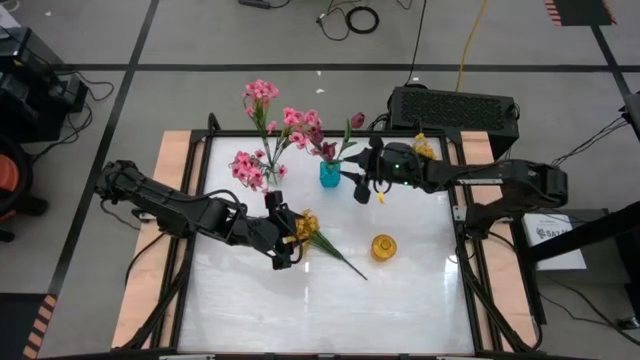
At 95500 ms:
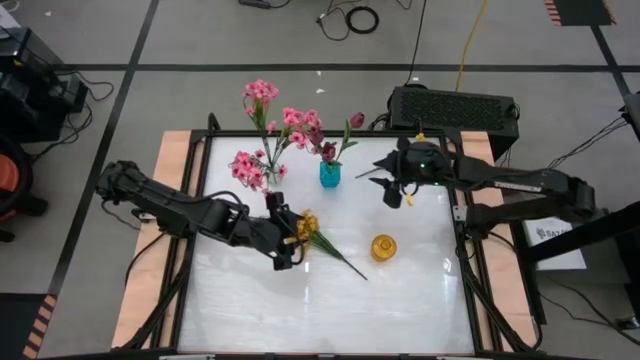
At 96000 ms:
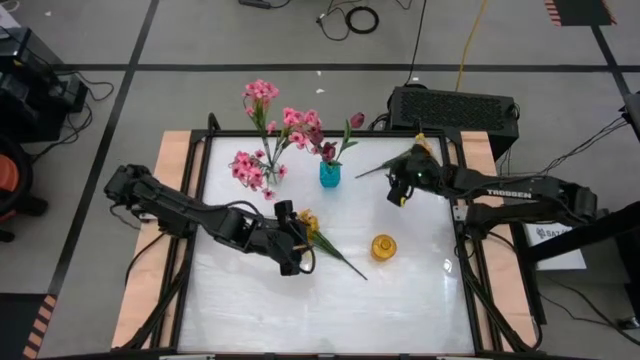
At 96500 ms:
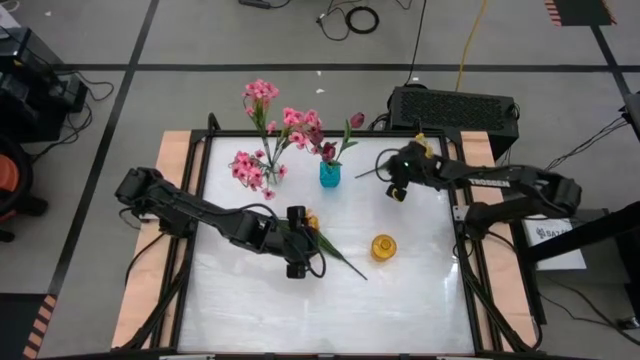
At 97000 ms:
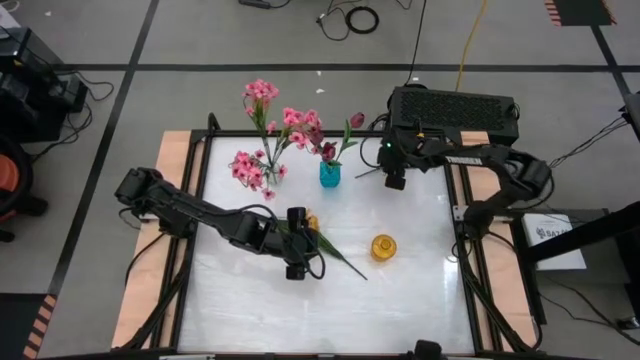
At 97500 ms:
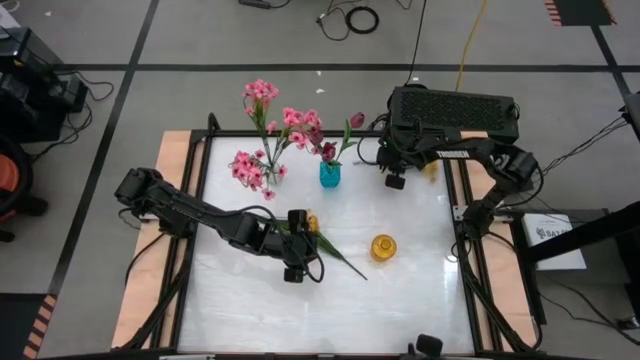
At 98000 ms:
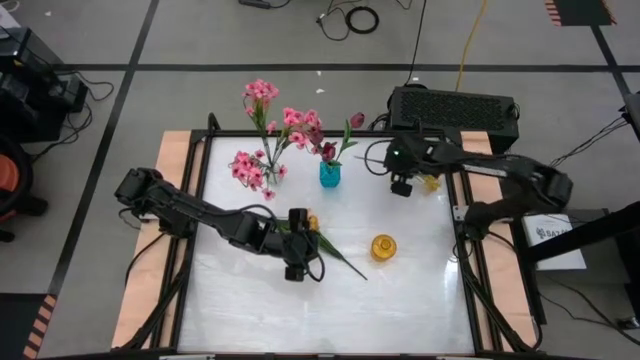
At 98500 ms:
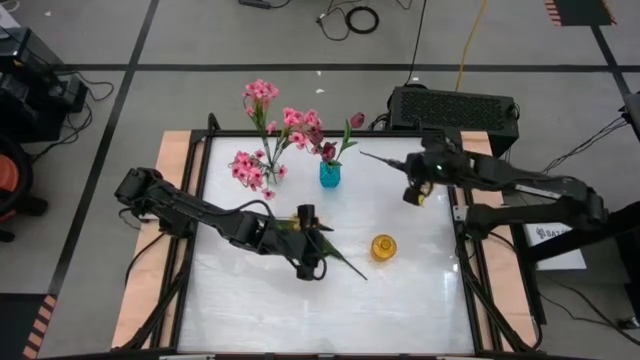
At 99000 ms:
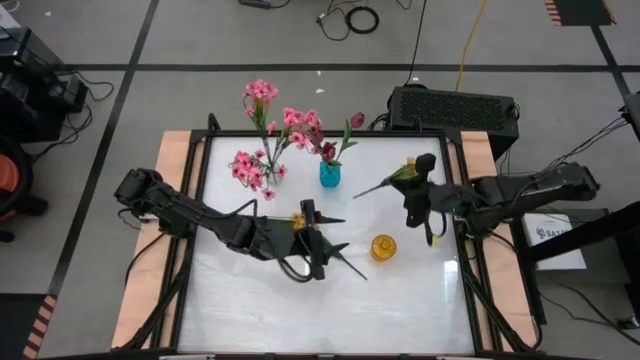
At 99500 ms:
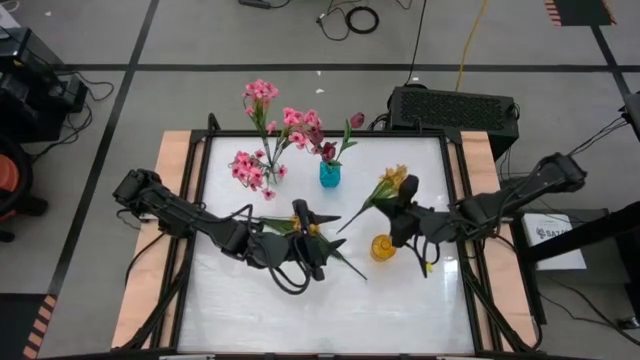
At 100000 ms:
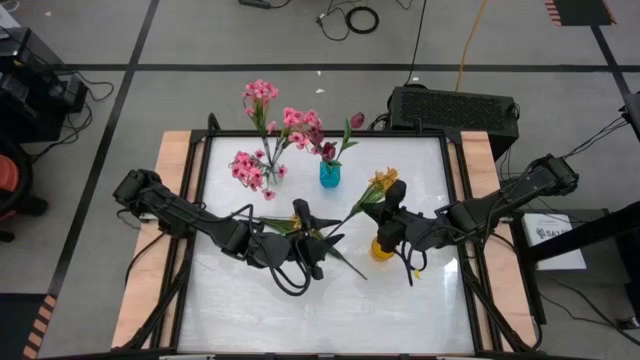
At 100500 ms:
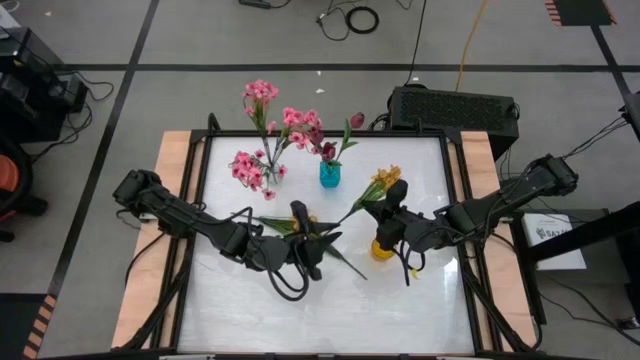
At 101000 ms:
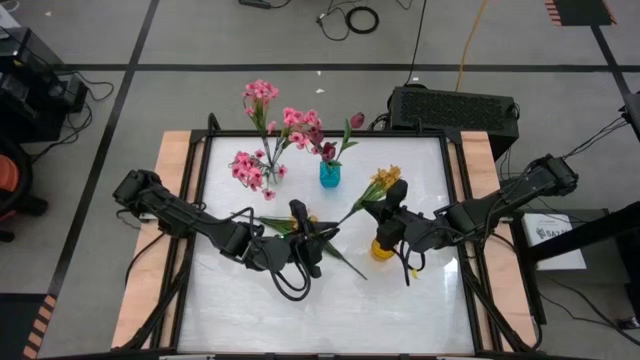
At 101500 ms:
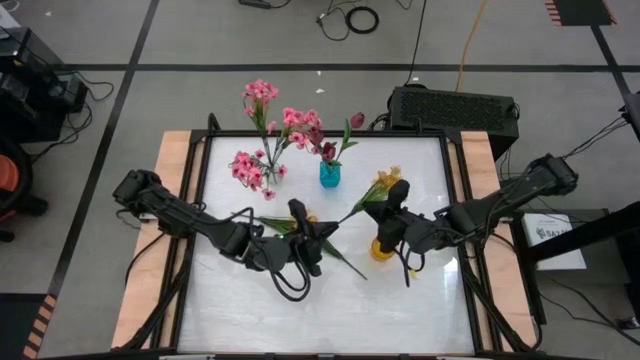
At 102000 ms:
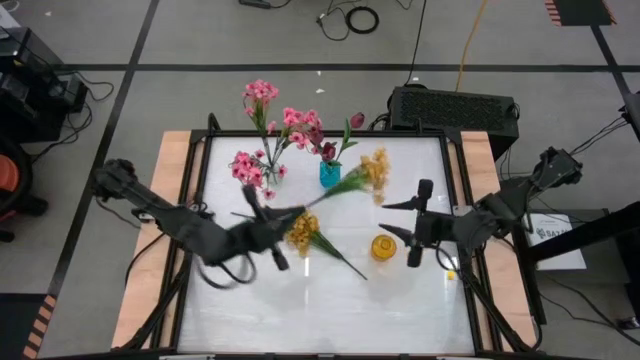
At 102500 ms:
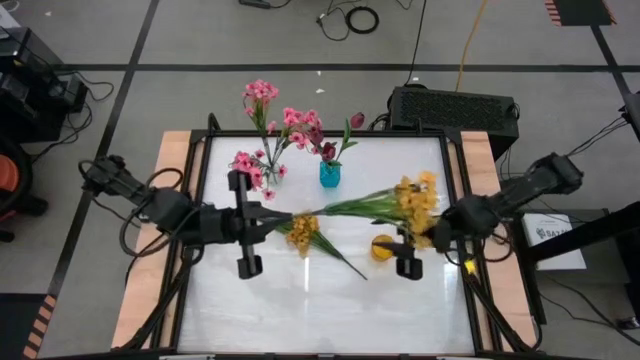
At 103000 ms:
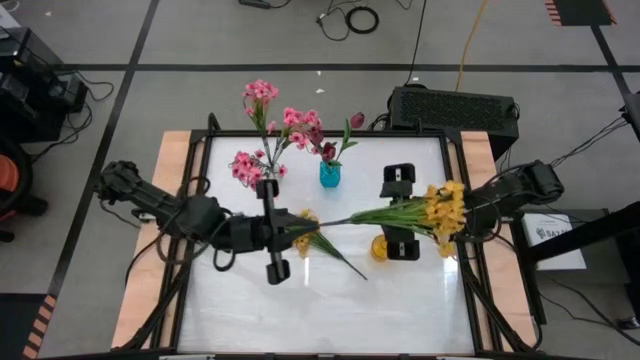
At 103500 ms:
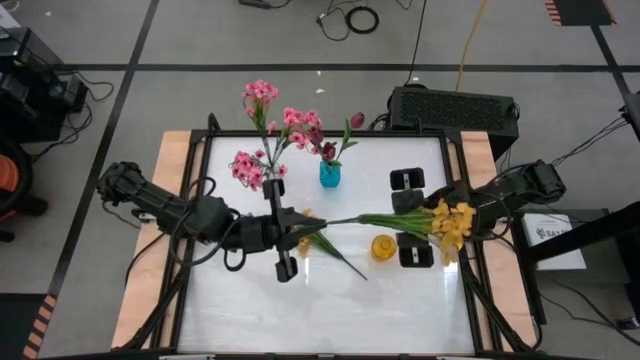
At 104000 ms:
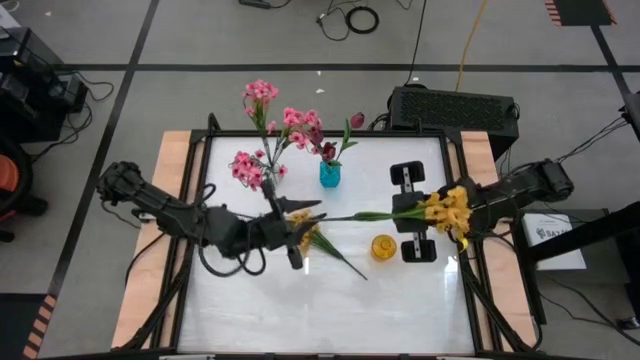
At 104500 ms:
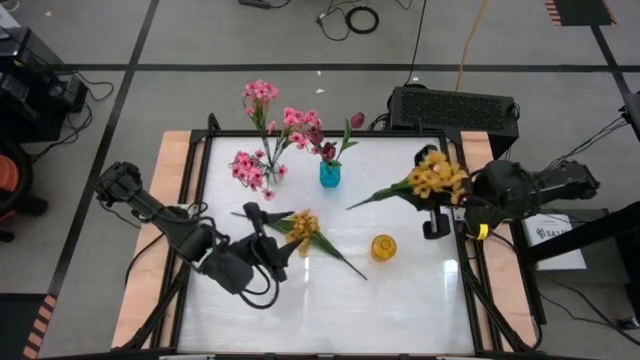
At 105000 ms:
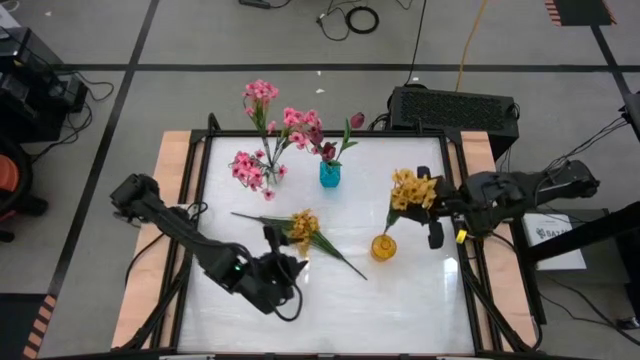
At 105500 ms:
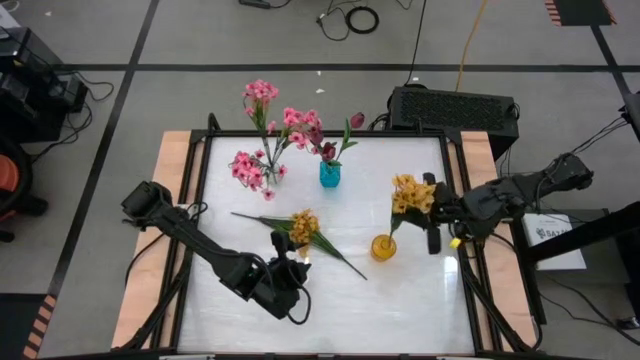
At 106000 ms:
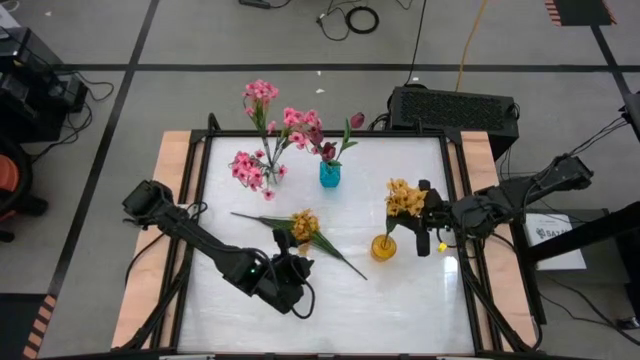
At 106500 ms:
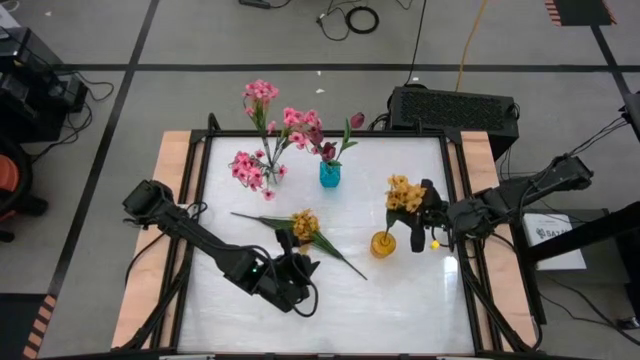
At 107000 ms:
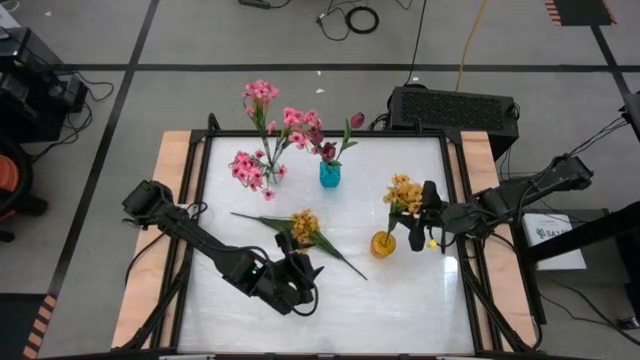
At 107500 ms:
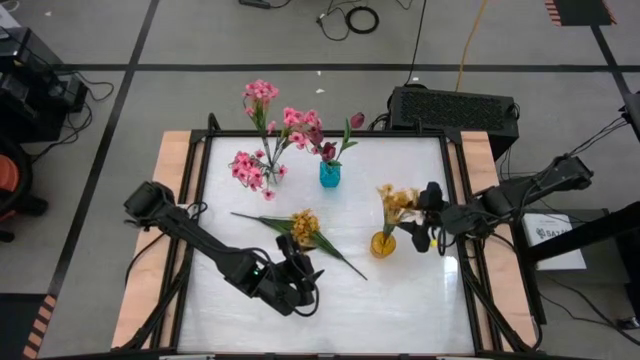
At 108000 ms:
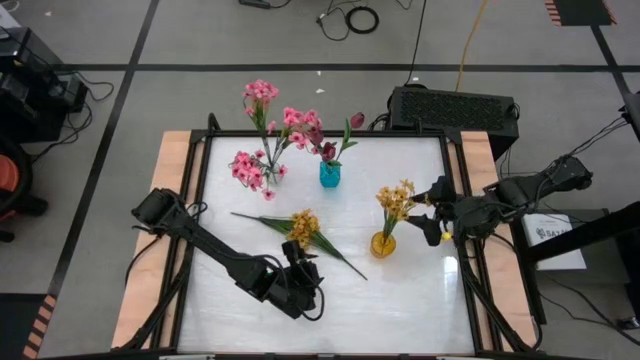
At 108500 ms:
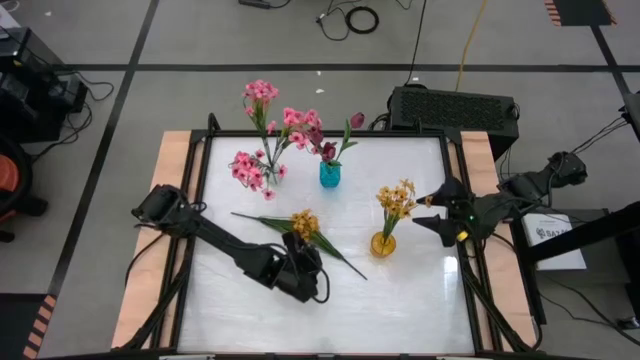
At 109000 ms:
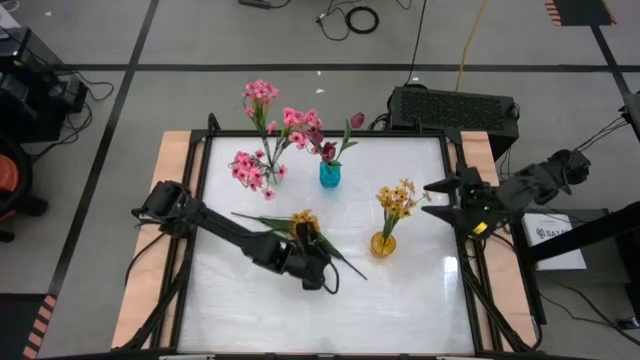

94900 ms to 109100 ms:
Task: Sort flowers into vase by color
Put the top yellow flowers into the yellow vase

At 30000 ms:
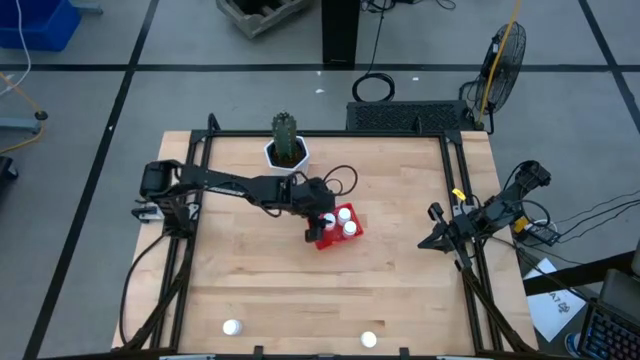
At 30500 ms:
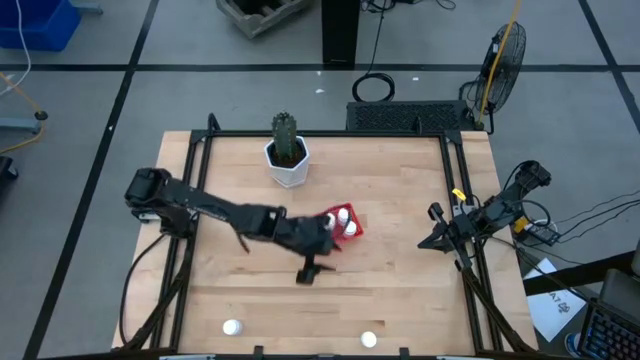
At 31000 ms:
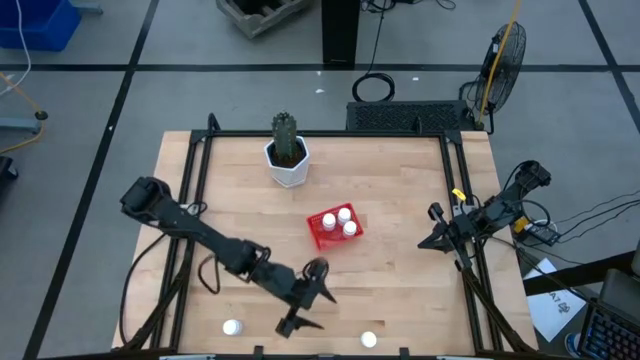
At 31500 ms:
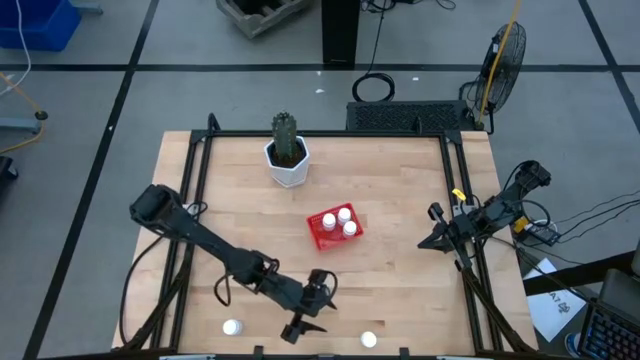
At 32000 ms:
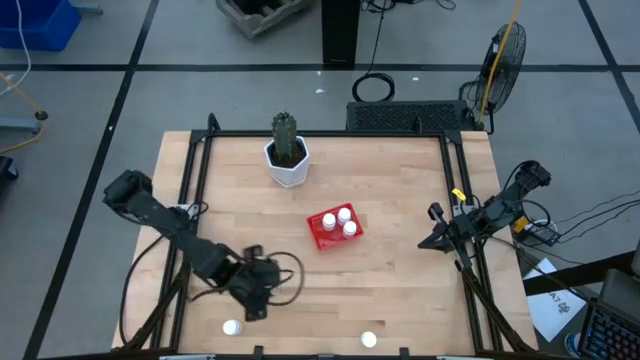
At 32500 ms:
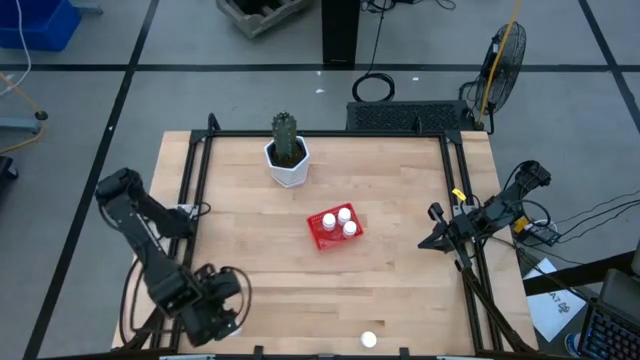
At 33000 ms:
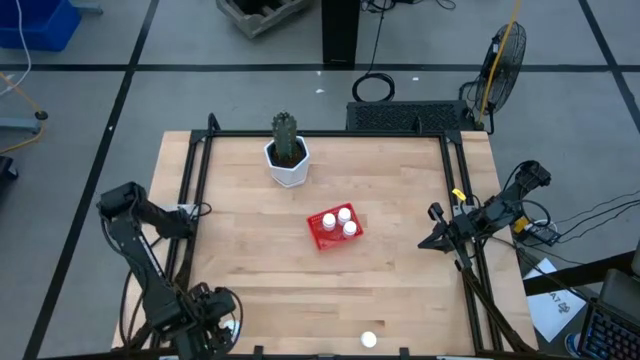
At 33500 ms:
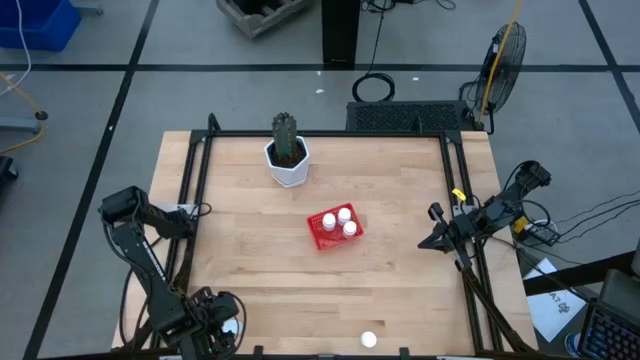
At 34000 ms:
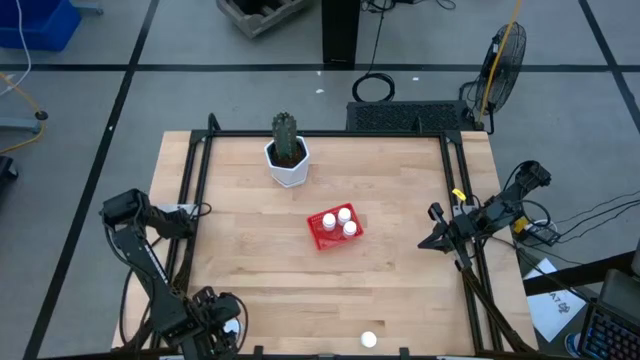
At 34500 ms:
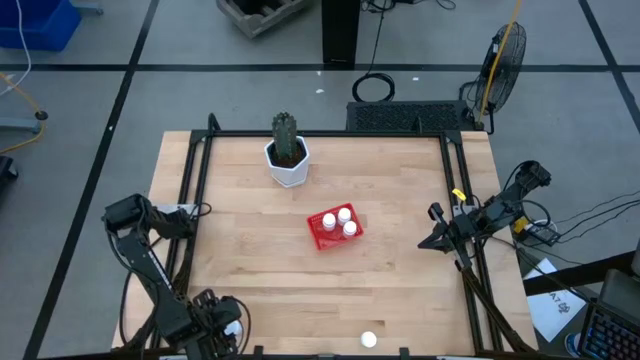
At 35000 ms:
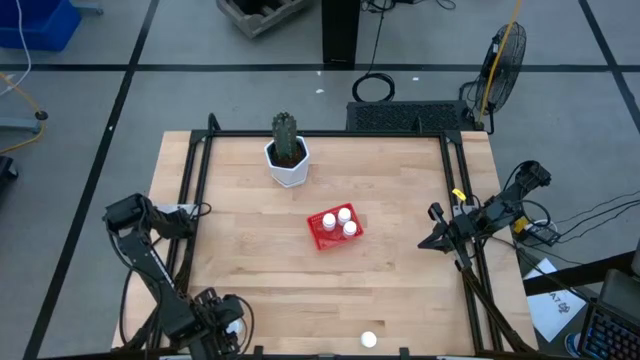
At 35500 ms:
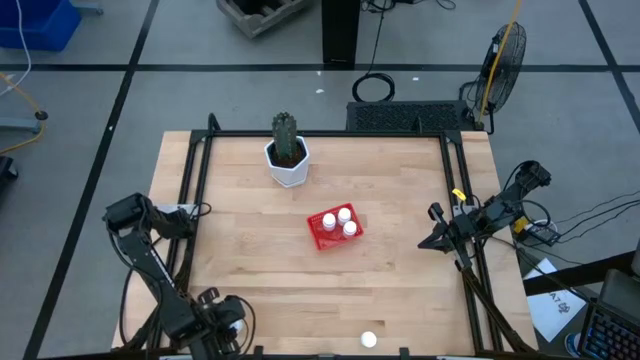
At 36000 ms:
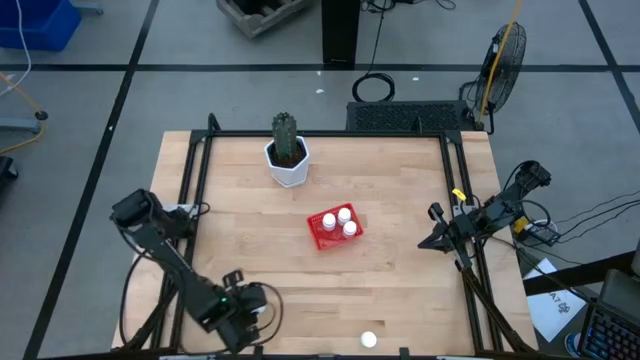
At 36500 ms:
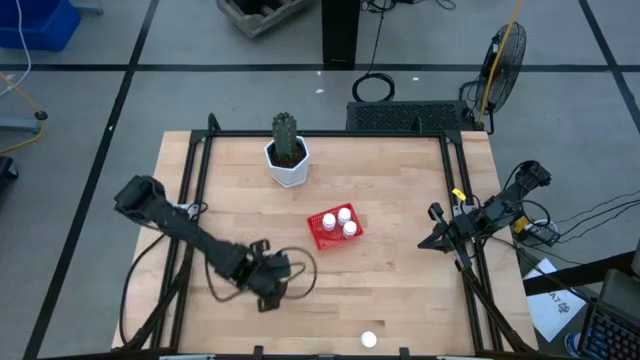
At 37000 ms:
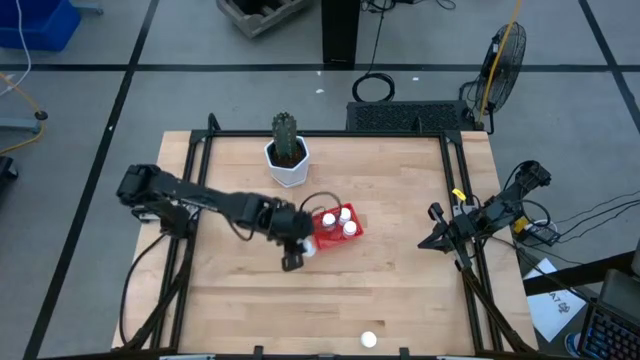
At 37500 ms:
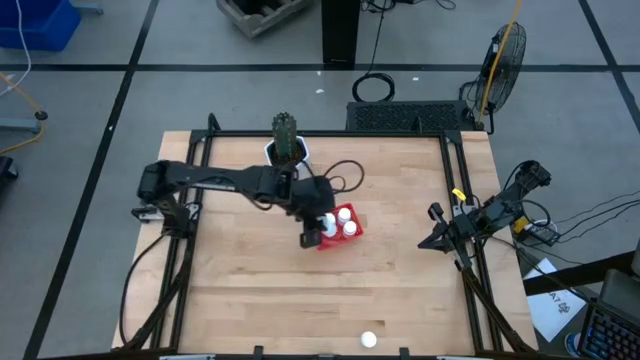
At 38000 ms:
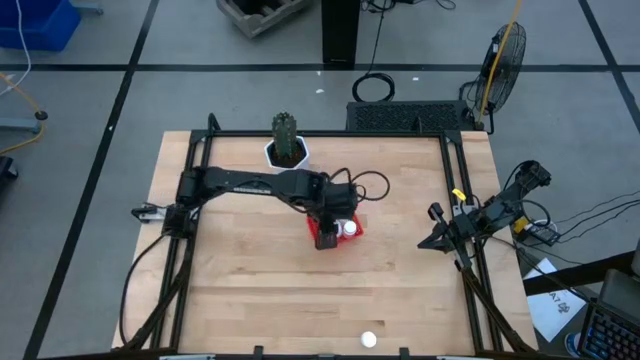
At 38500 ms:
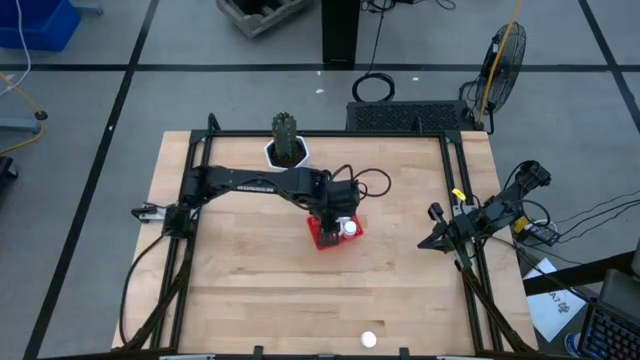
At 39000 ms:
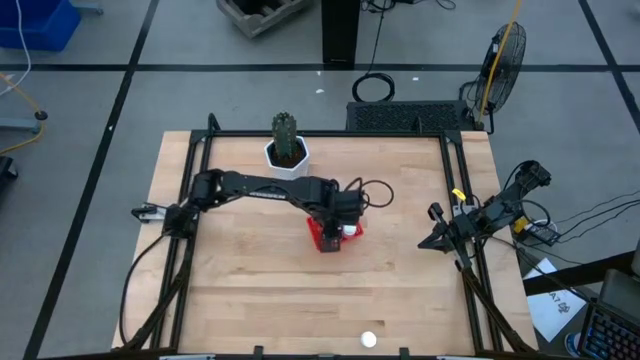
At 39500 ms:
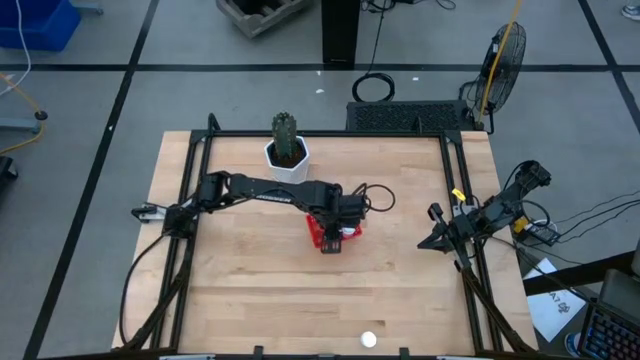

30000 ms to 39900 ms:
Task: Pick and place pill bottles into a basket
Put the white medicine bottle into the red bin
